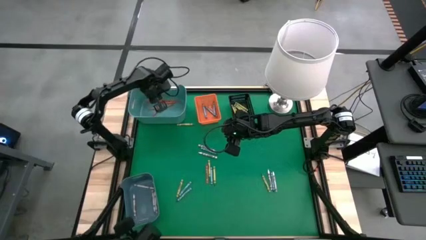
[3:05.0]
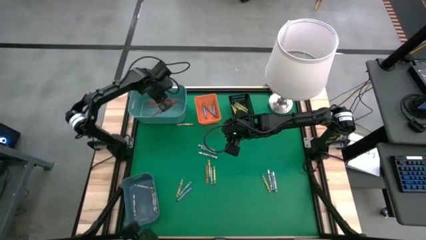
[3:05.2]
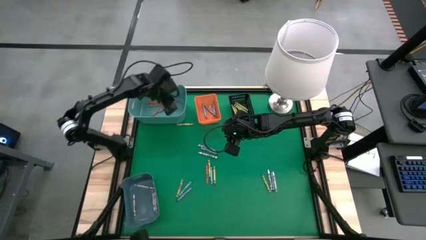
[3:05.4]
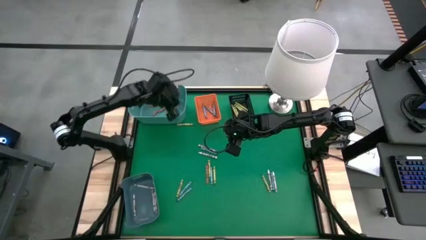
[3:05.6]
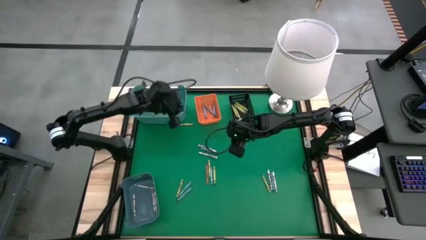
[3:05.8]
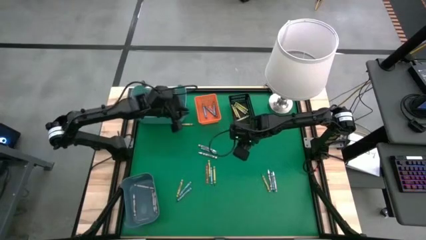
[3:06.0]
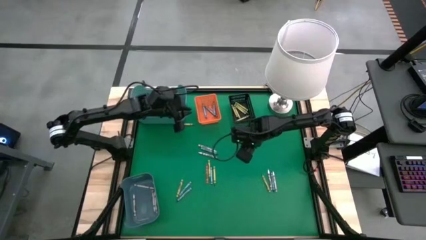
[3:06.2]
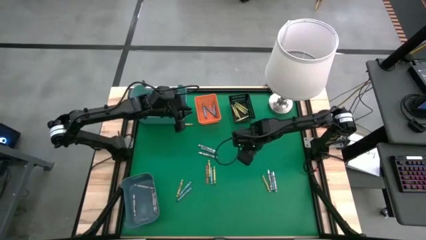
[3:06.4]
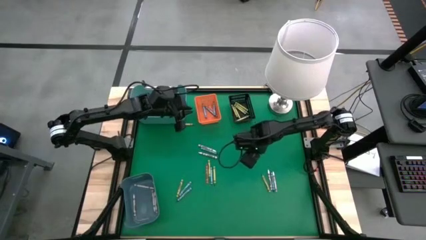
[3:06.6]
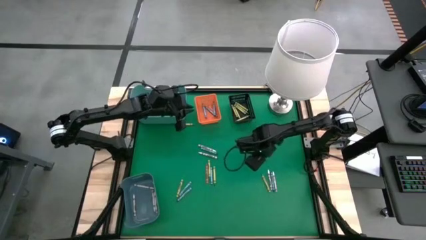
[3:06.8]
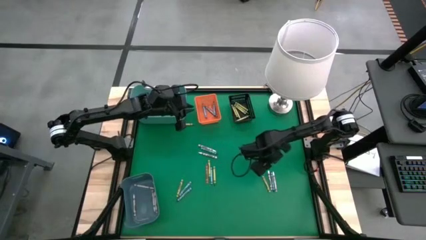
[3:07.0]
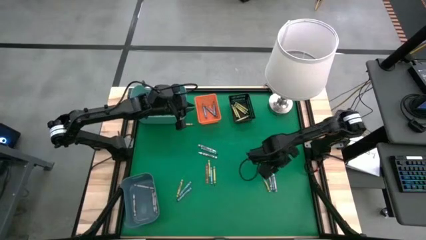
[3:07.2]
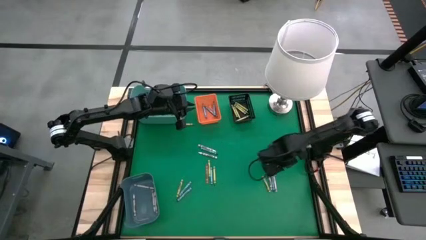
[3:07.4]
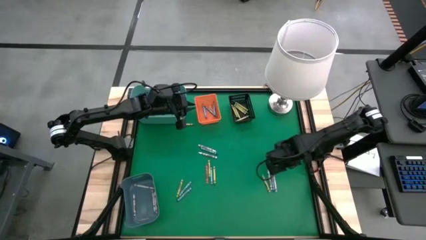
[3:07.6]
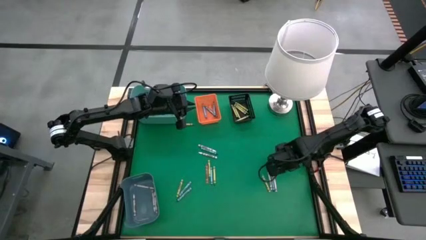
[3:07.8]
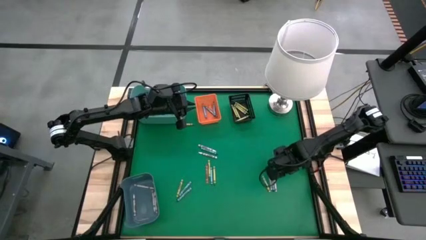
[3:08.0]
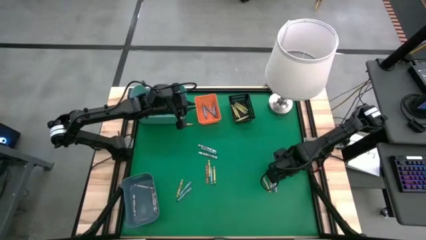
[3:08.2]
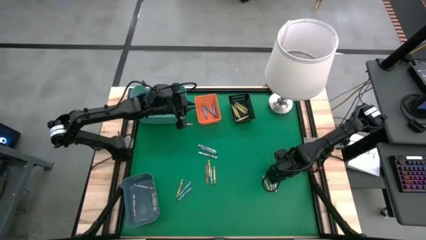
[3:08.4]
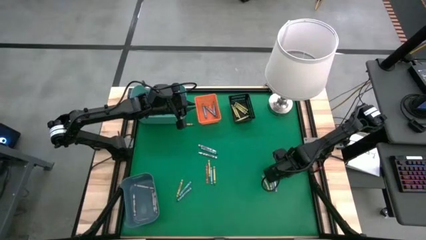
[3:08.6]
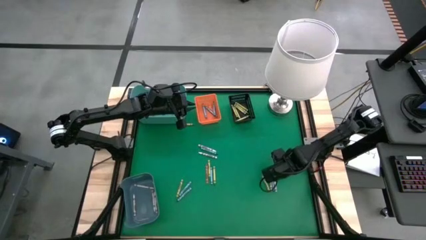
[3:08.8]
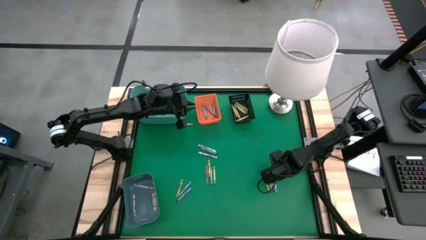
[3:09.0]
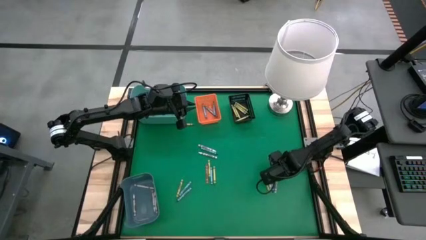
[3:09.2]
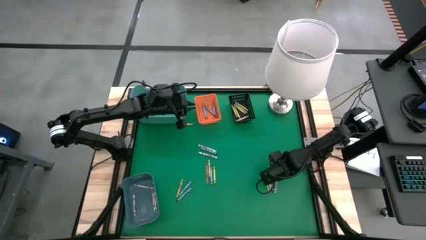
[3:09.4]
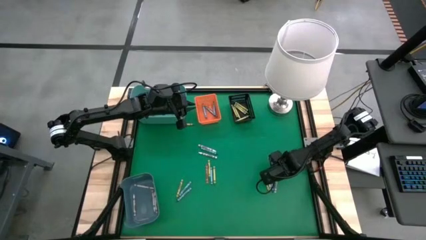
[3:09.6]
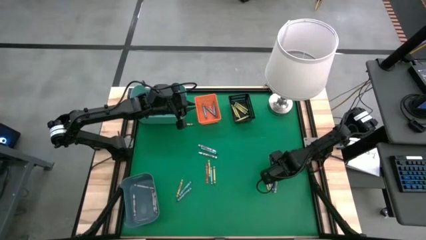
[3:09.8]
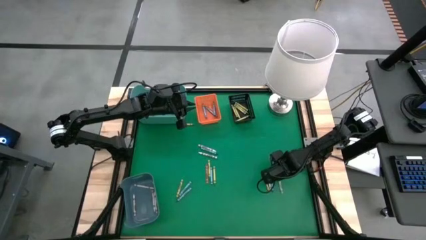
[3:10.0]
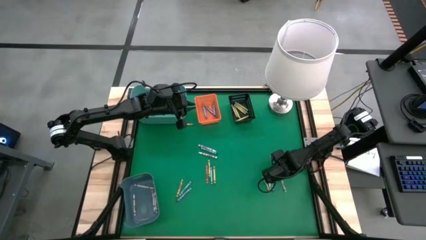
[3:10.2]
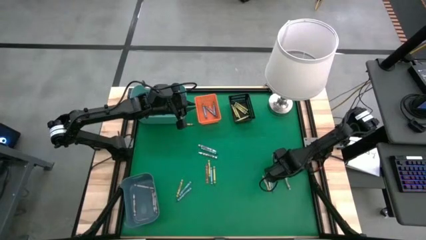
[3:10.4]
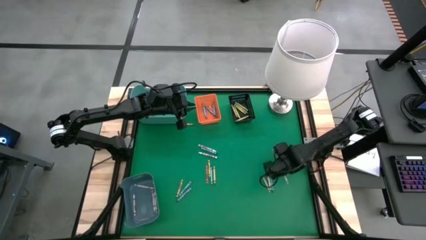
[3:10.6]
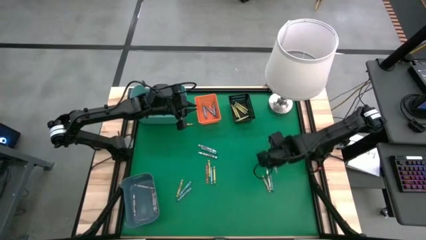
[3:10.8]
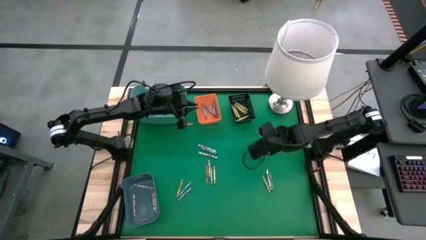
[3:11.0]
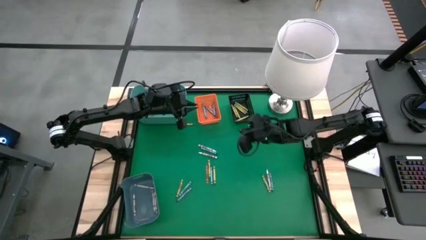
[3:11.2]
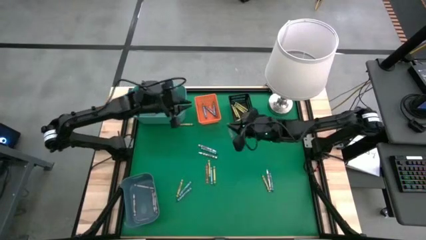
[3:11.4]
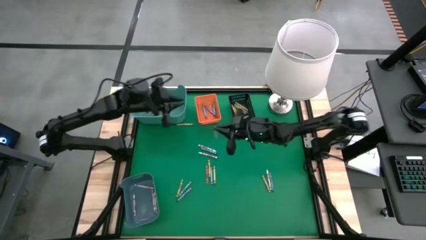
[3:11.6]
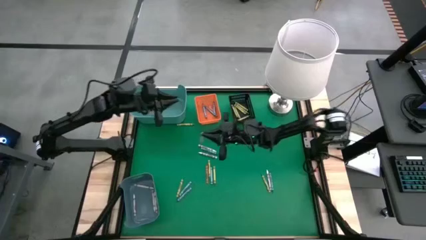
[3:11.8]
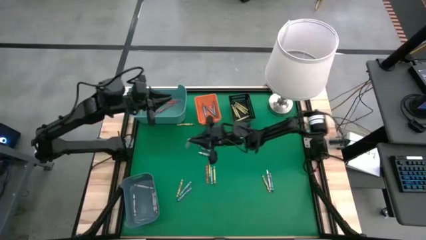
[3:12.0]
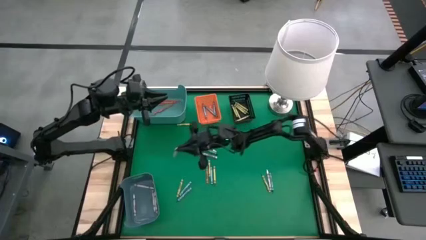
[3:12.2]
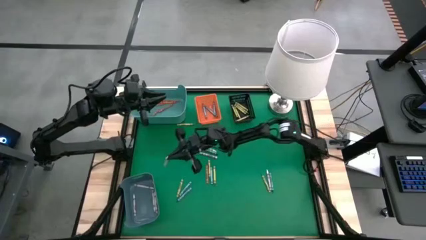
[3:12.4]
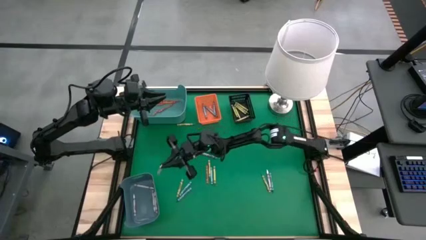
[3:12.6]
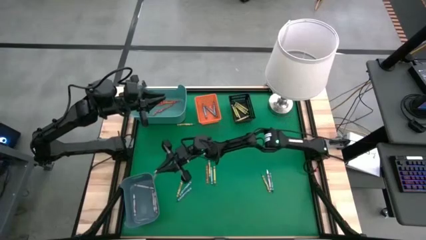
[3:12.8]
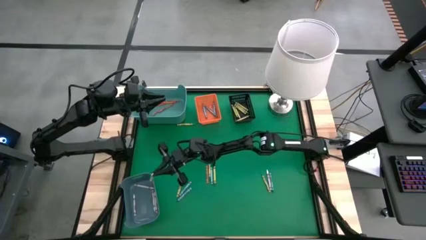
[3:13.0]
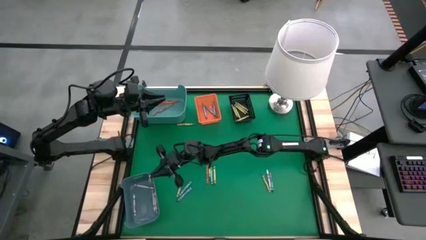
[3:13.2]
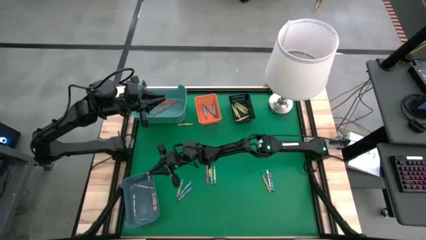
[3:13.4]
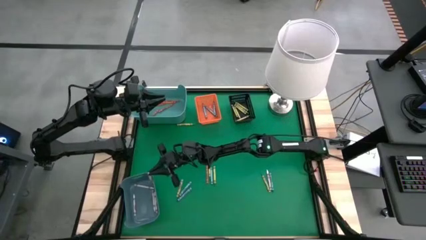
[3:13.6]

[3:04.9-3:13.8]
Task: Sort crayons
Put the white crayon into the blue bin

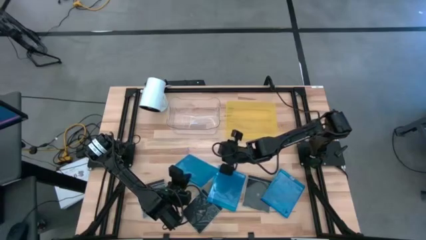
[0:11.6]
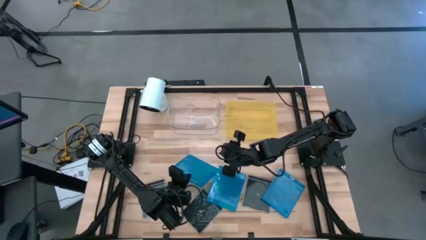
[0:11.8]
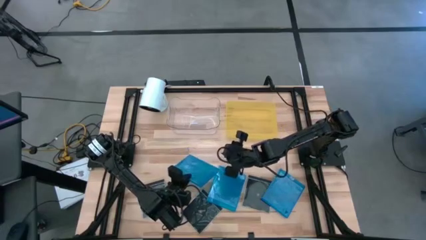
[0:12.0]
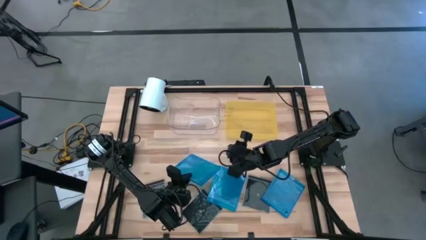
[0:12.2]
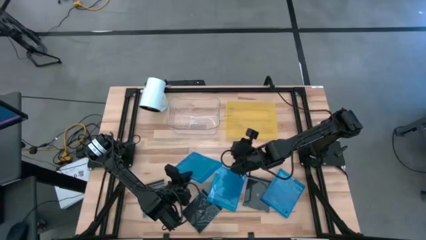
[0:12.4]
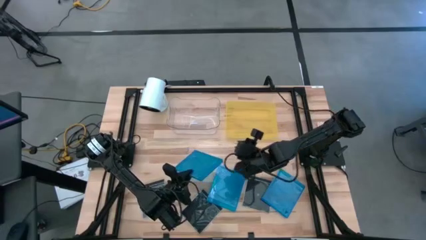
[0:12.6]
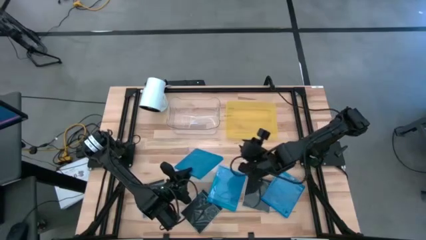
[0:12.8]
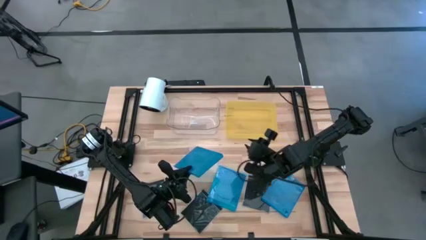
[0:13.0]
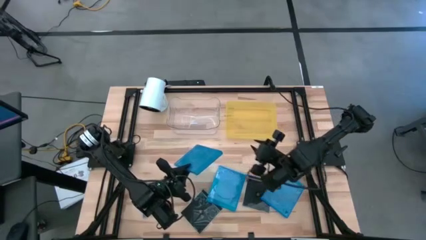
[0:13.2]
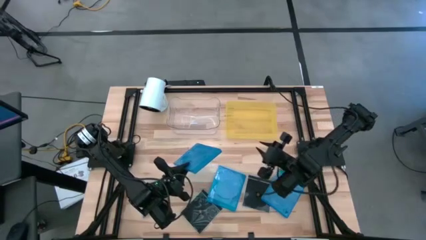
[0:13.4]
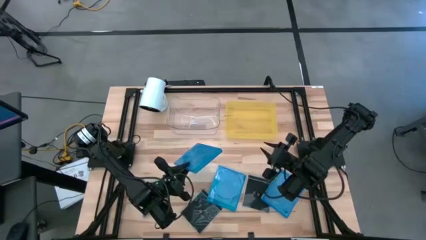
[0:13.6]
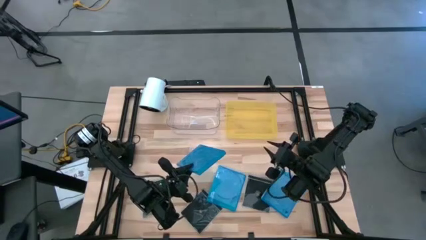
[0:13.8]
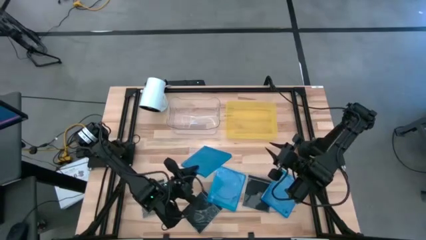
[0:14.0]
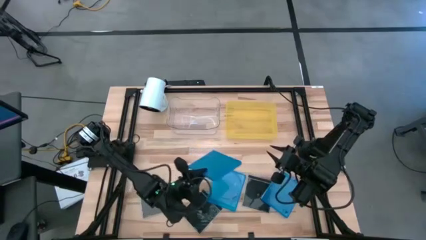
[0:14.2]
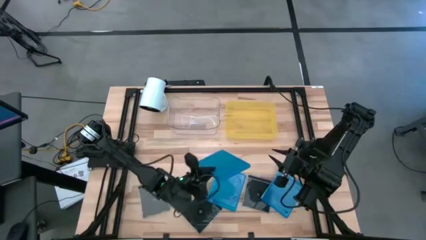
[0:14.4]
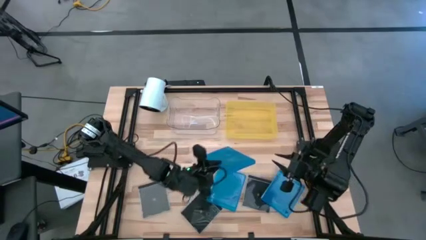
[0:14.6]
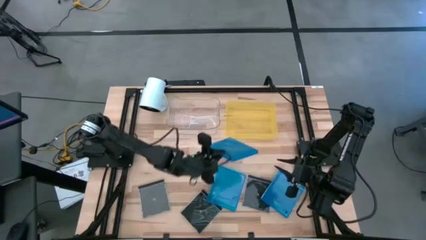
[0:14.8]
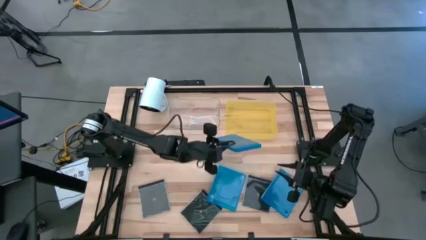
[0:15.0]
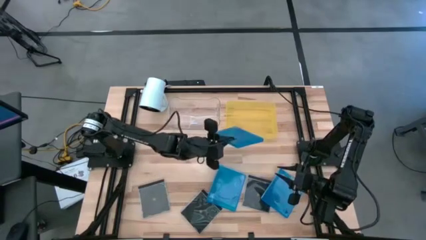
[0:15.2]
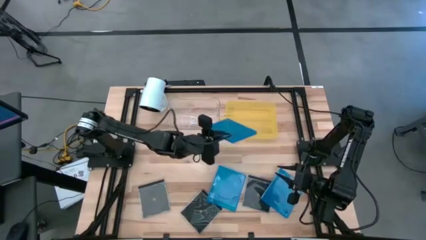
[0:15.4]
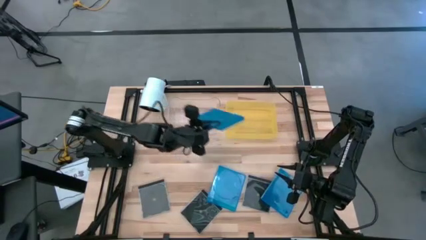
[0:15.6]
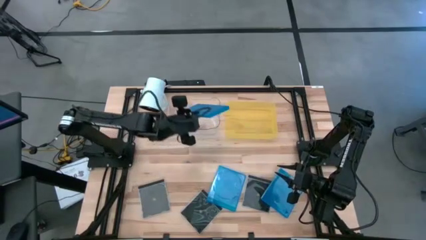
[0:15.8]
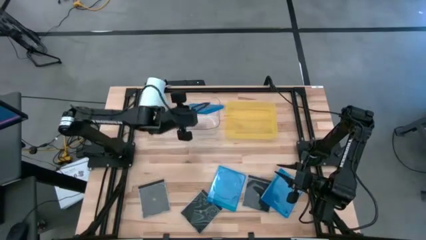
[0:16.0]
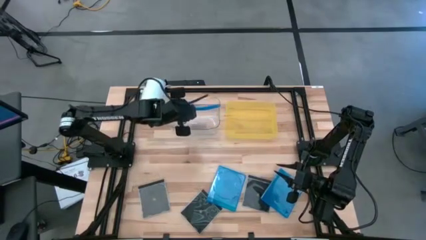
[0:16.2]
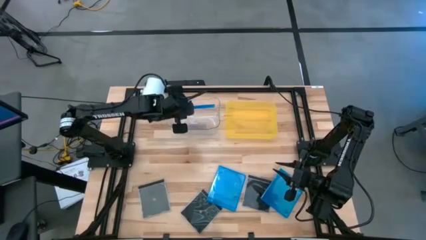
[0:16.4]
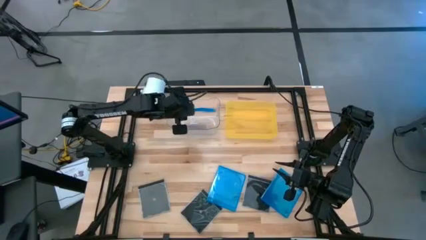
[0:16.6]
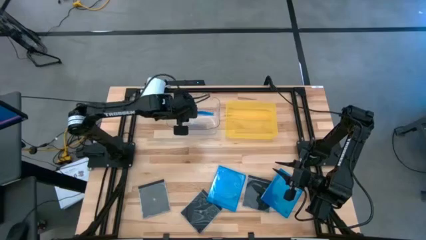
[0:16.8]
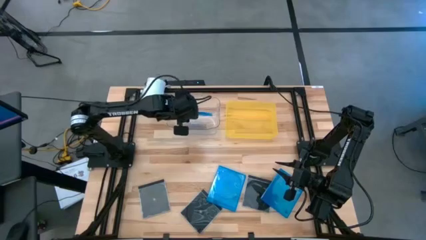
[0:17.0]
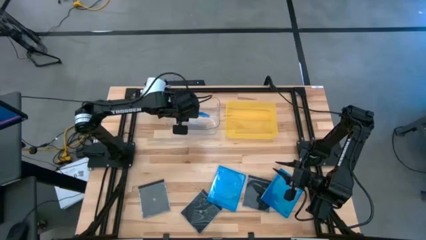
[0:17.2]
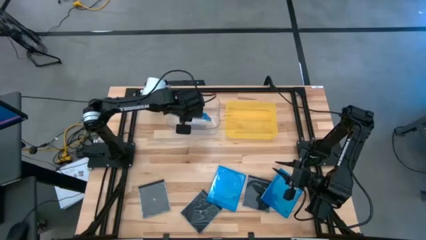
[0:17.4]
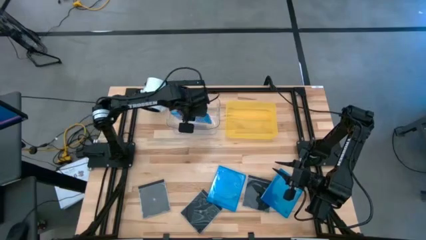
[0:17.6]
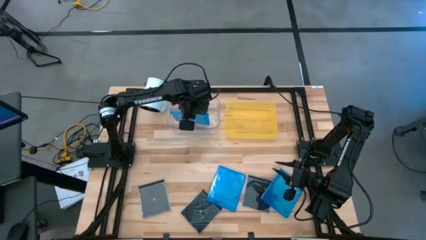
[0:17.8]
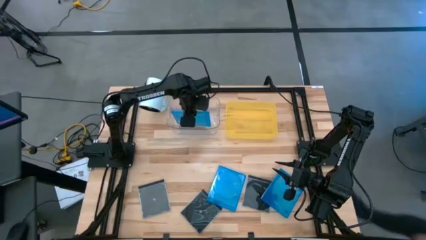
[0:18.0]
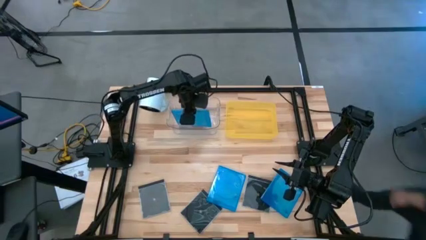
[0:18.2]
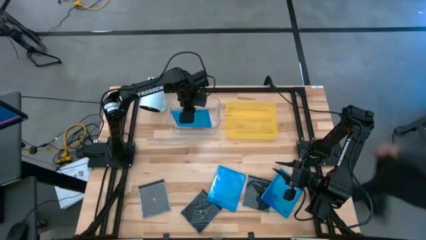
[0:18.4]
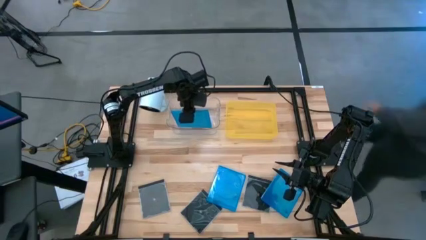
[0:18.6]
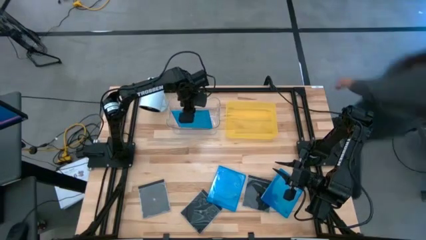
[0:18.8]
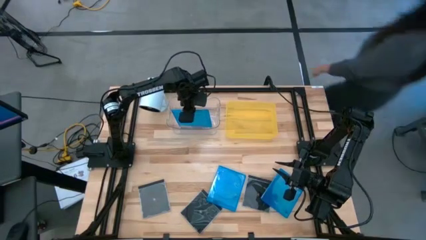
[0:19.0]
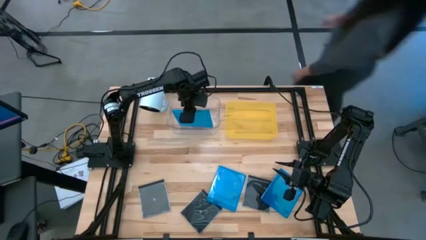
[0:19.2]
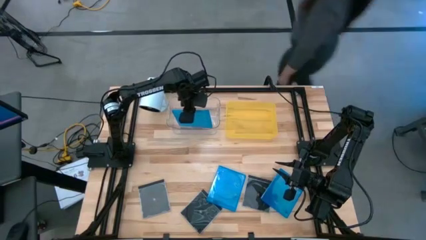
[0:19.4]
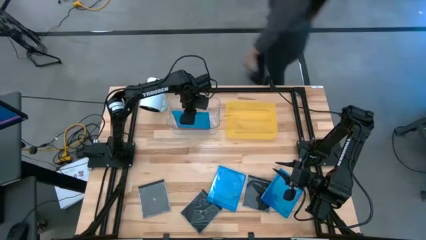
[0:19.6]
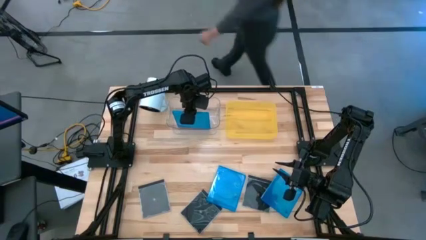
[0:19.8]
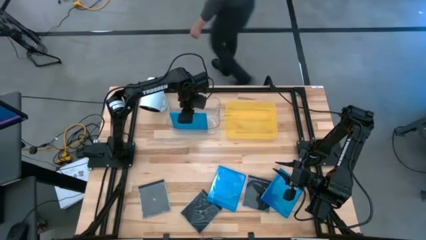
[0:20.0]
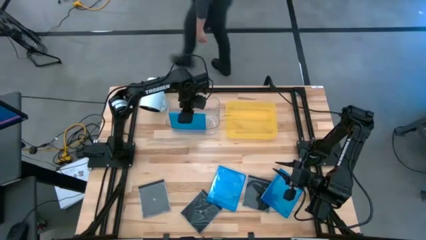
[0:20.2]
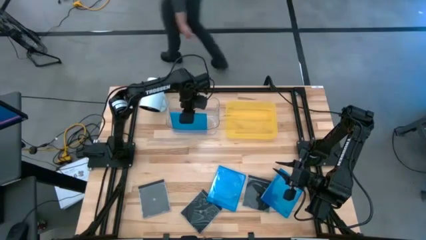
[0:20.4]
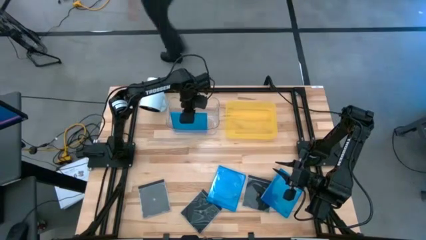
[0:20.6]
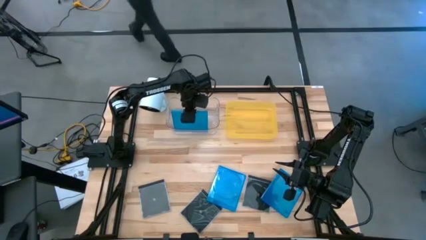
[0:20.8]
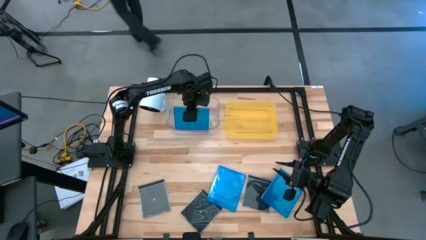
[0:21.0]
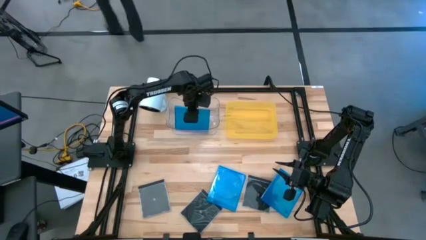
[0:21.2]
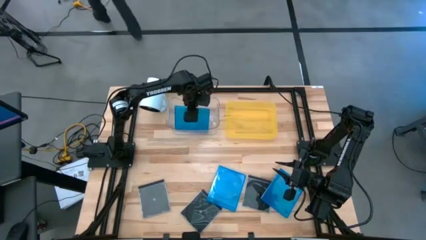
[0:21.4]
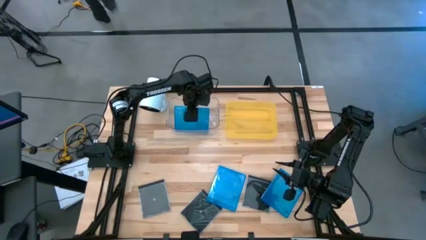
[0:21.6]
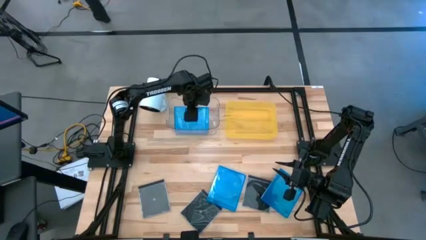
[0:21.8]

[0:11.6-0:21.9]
Task: Pick & place jewel cases by type
Put the left blue CD case into the transparent bin
